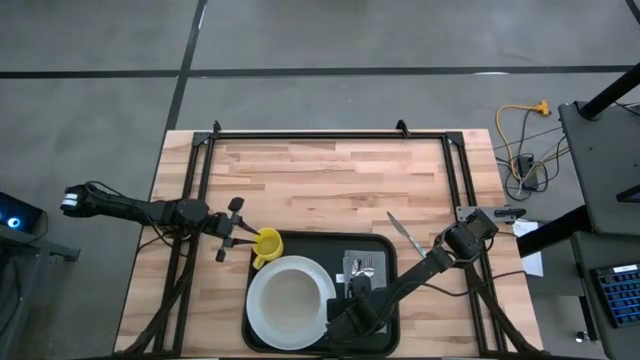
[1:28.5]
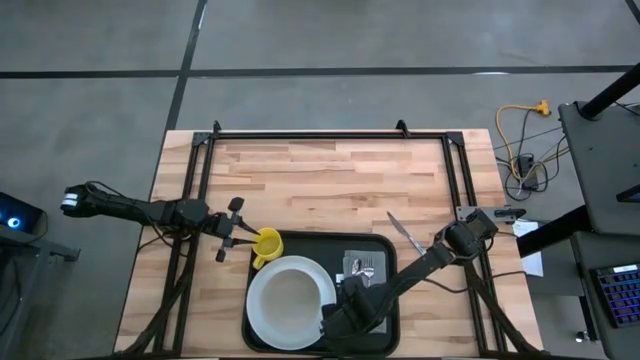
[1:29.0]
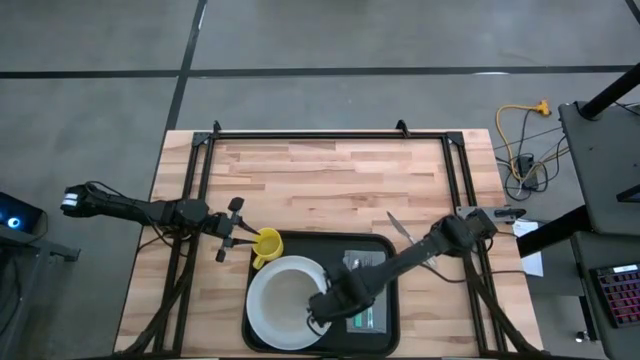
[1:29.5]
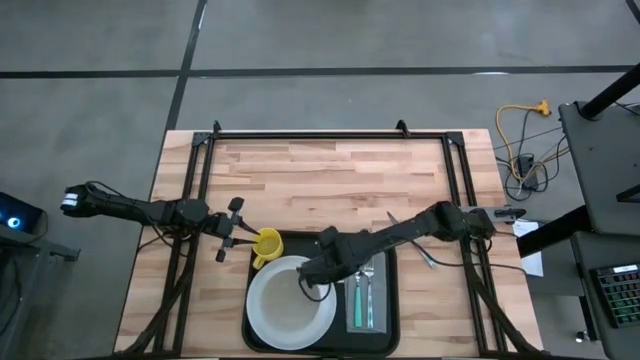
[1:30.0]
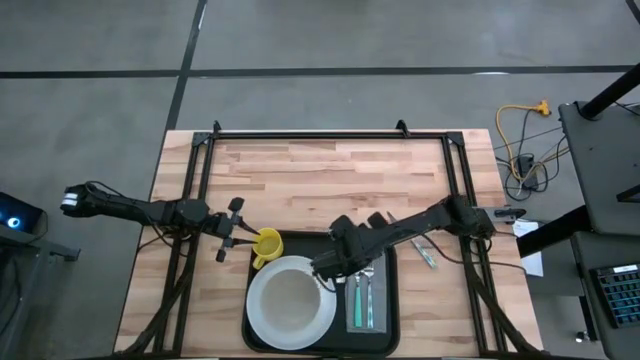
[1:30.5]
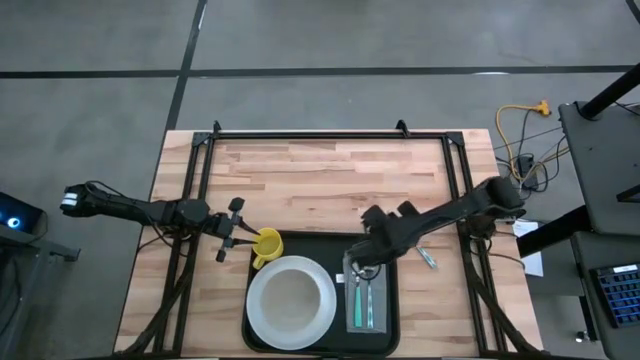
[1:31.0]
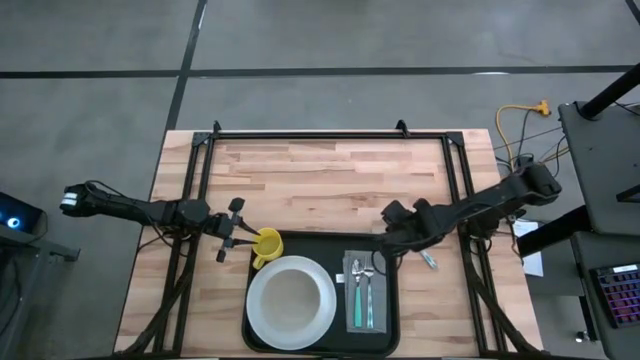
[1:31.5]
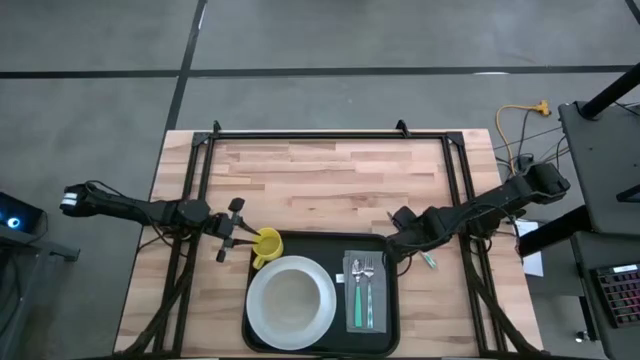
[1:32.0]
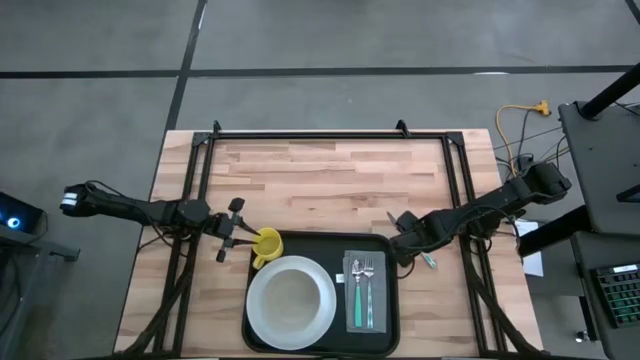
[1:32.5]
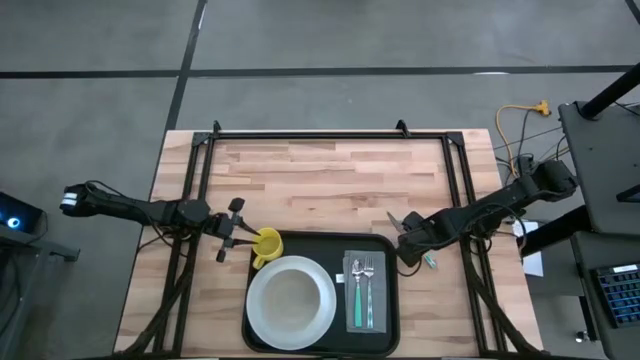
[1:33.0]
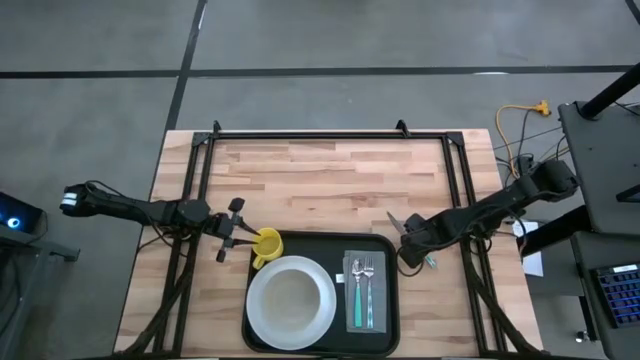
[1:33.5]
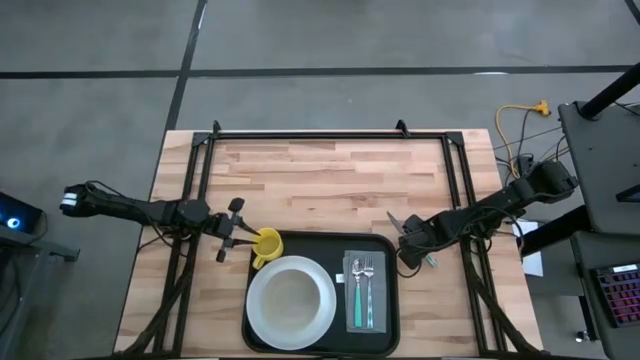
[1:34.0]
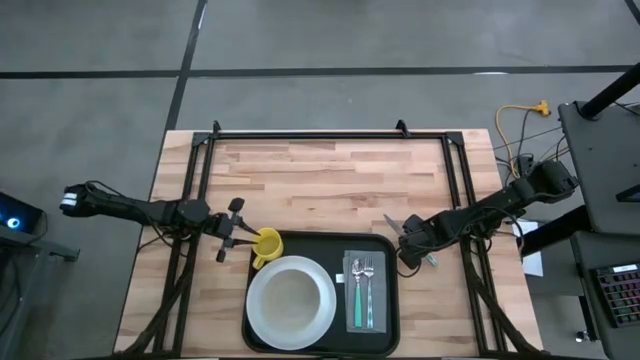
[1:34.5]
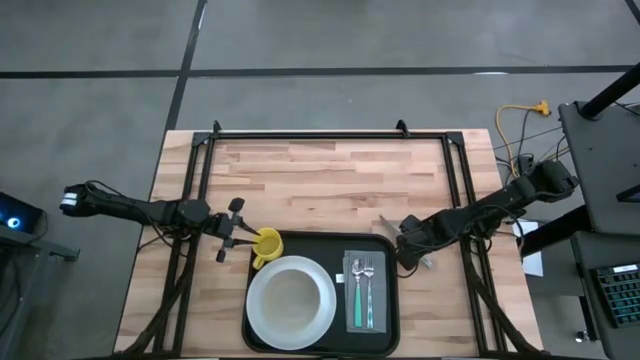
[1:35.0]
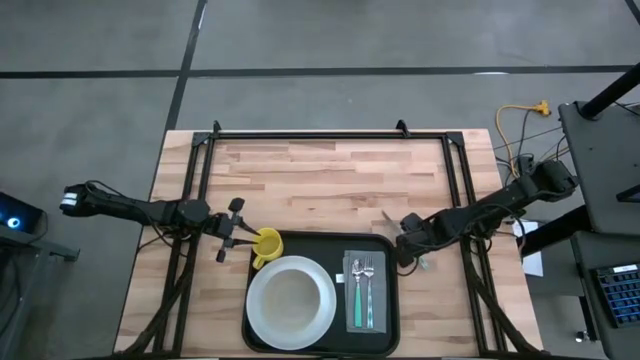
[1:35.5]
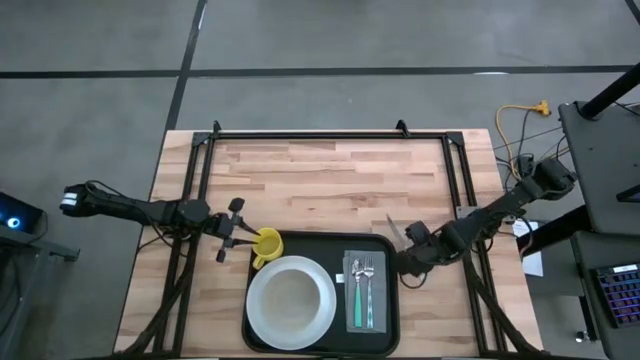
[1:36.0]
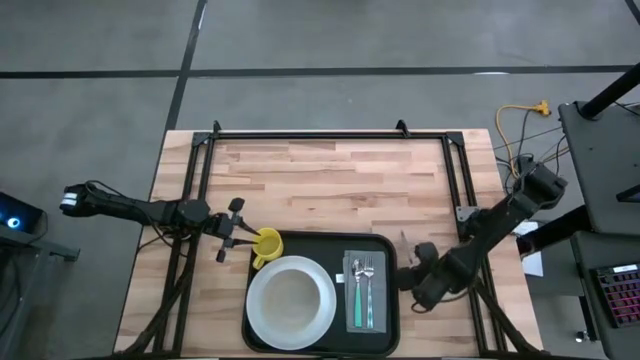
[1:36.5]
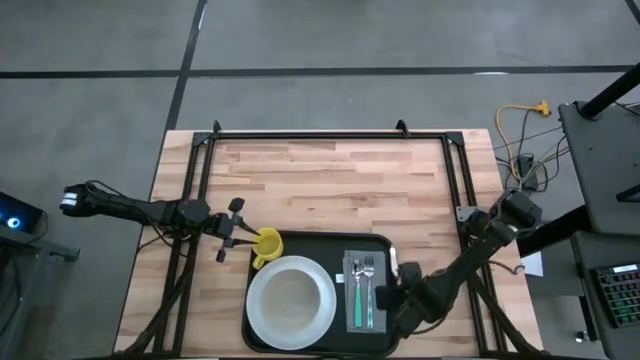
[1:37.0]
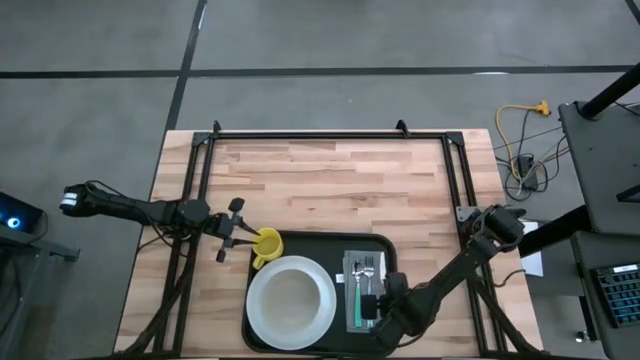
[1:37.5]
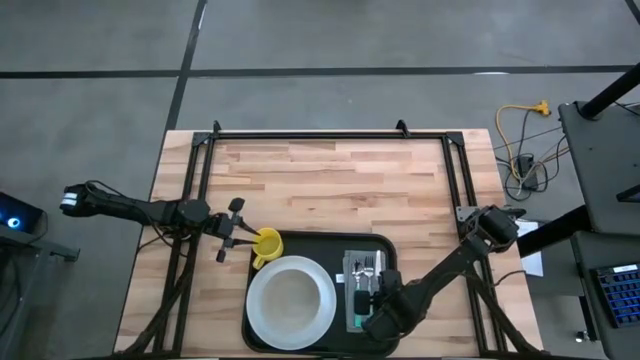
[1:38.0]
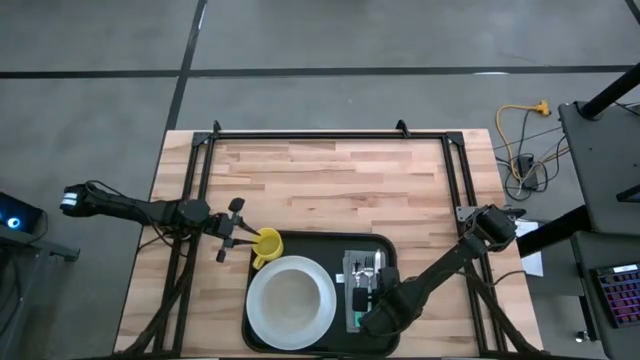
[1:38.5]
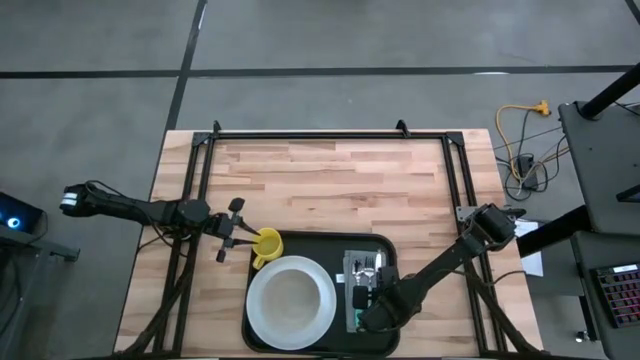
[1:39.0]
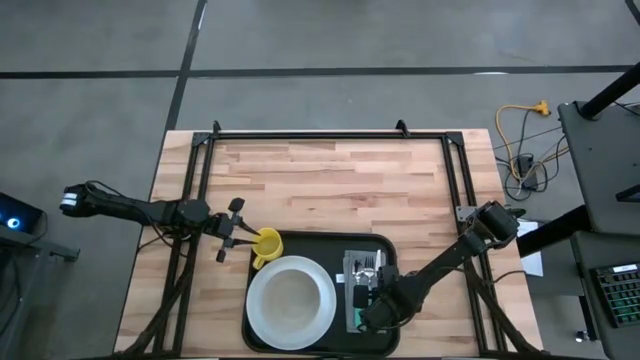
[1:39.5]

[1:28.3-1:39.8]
Task: Set up tray
Put the white patterned knife on the gray napkin to the right of the white patterned fork

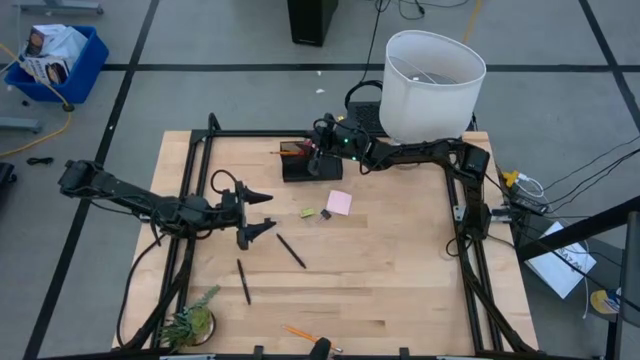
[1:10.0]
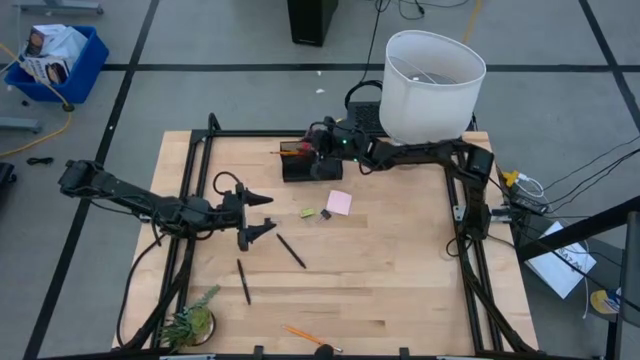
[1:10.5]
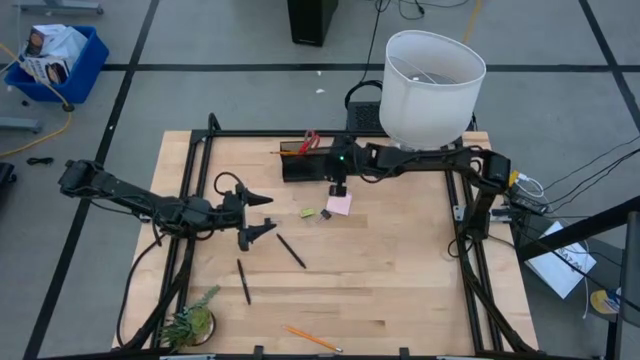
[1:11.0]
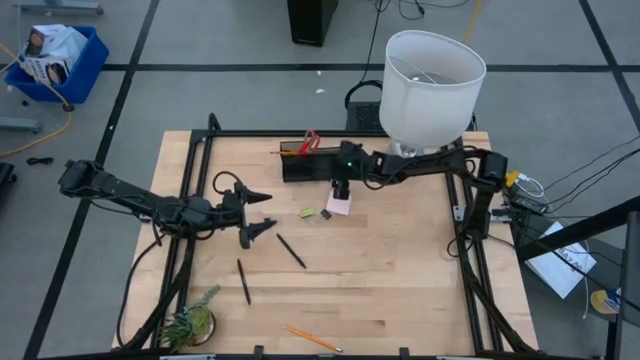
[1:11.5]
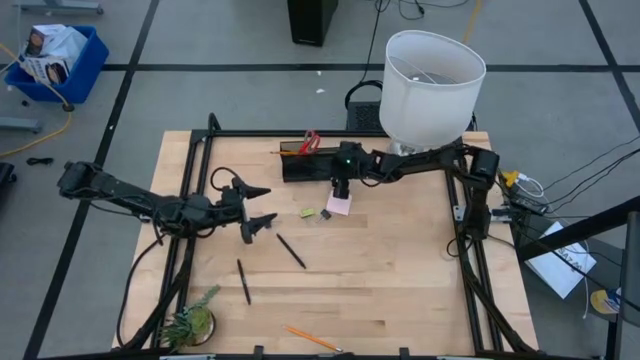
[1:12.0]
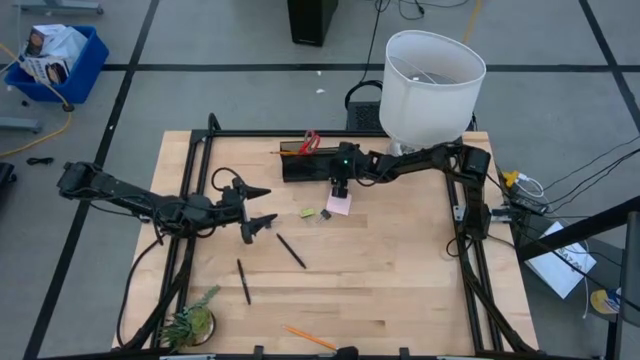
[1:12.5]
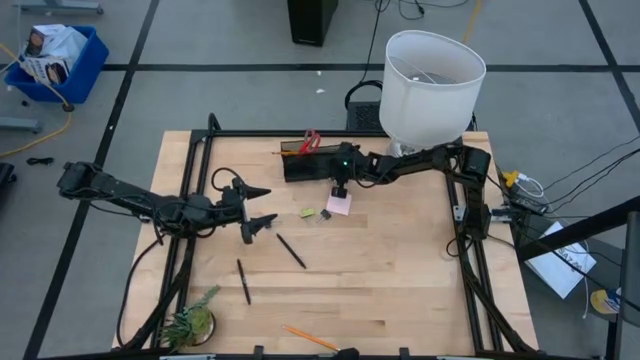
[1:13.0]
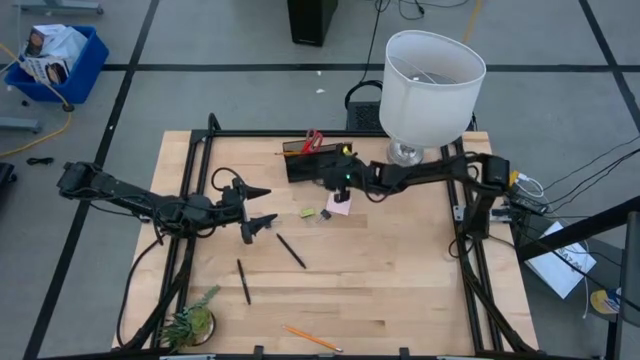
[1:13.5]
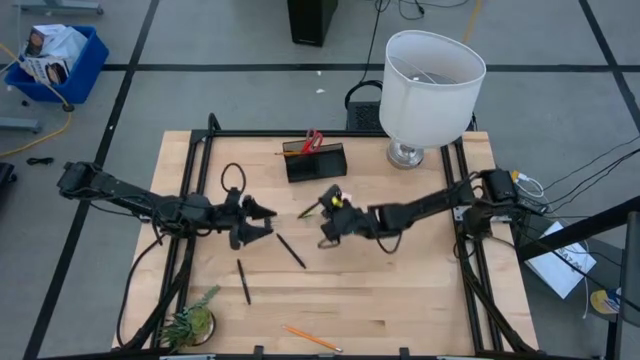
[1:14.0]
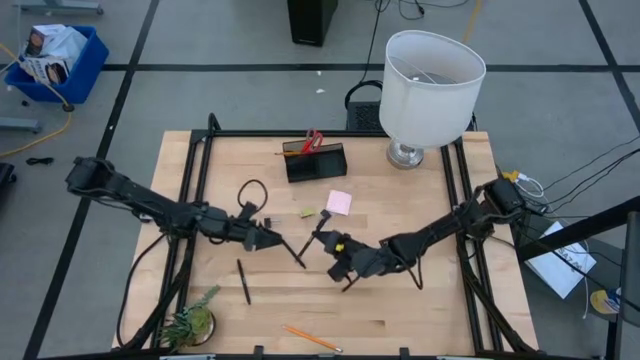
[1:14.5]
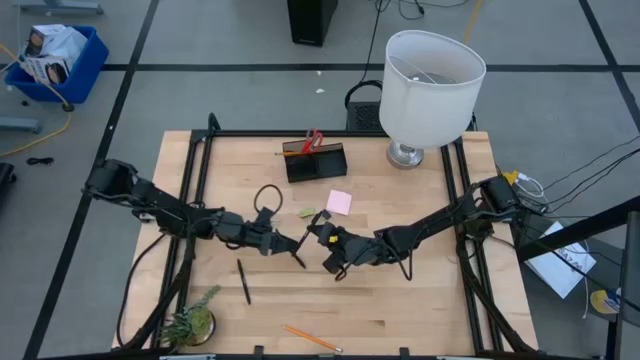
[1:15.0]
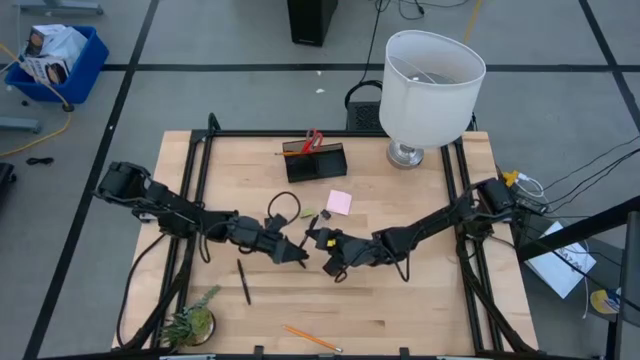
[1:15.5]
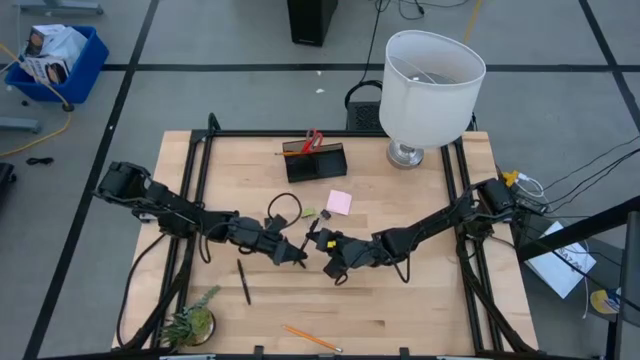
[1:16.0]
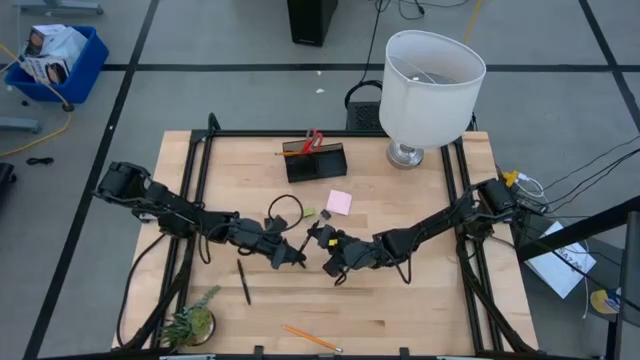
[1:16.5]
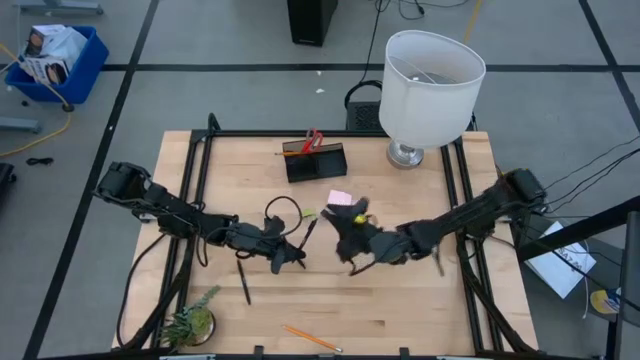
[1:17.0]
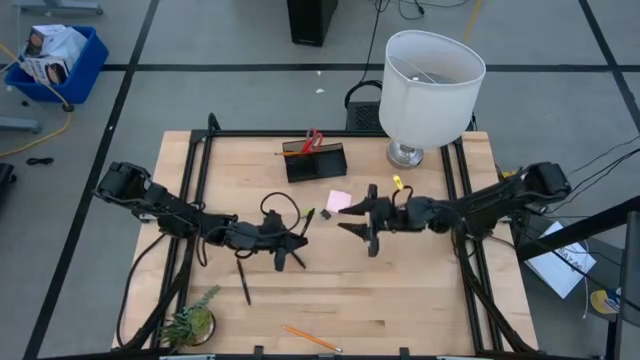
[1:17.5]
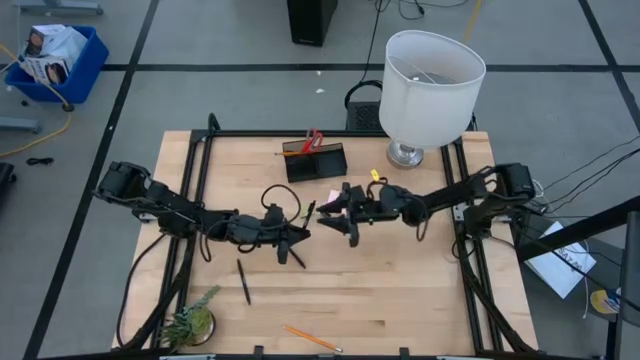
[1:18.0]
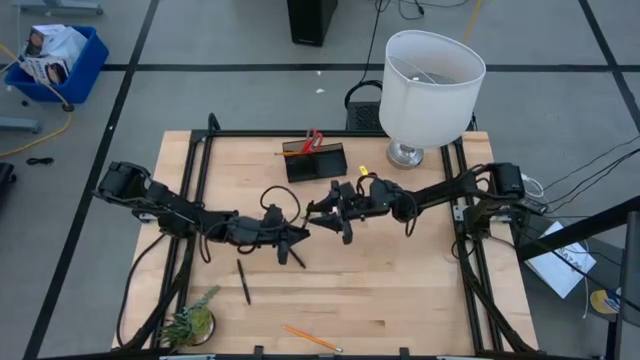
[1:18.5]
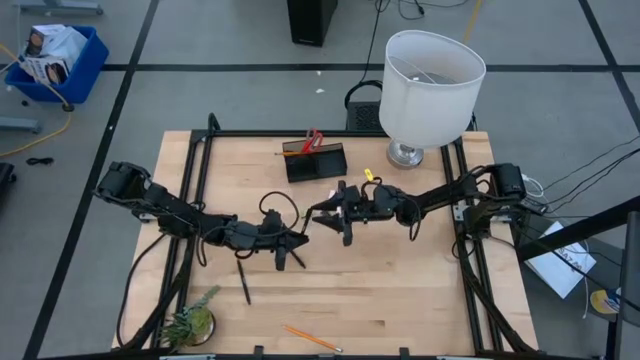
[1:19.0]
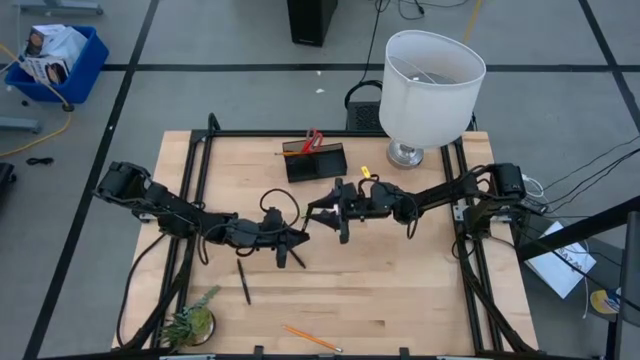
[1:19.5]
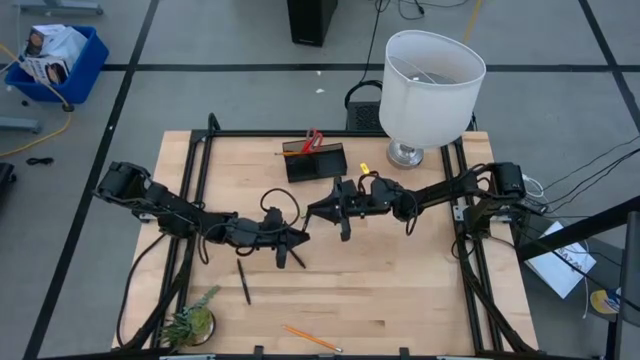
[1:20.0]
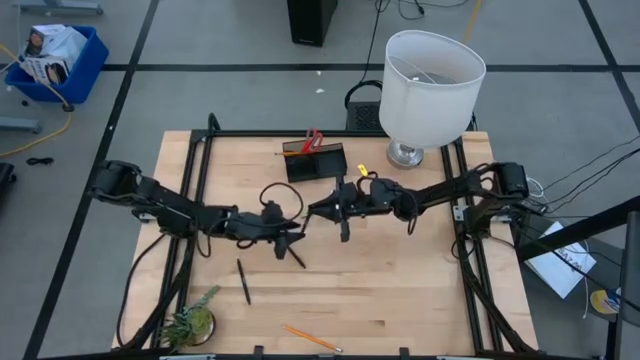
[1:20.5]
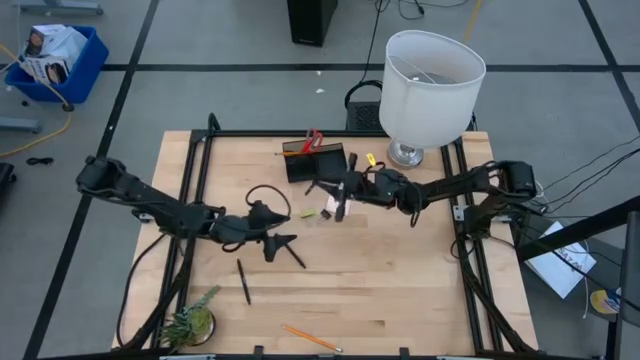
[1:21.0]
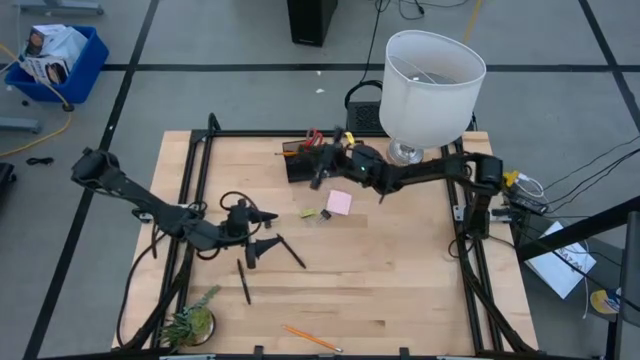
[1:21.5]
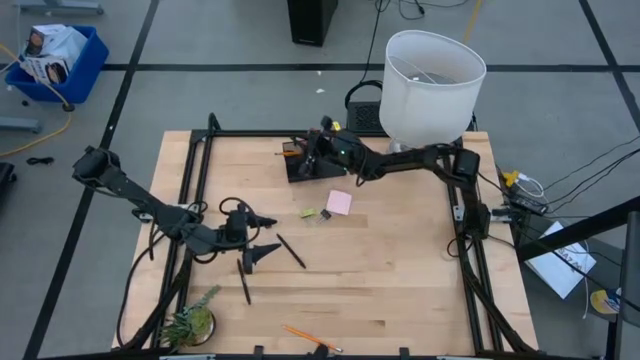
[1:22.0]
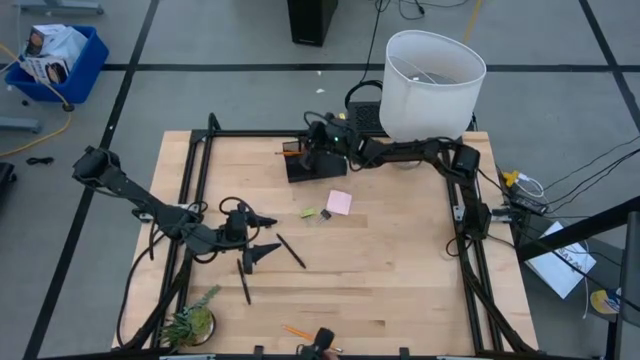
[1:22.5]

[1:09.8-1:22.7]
Task: Pick and place office supplies into organizer
Put the black pen into the black desk organizer
